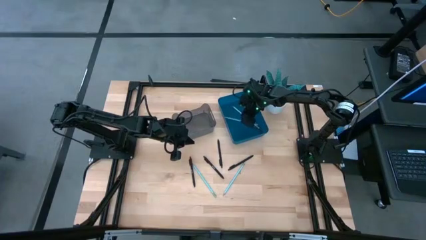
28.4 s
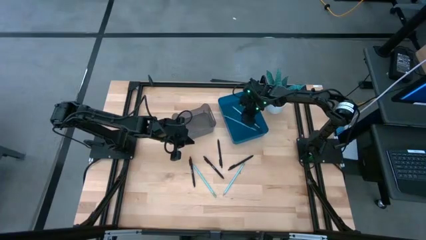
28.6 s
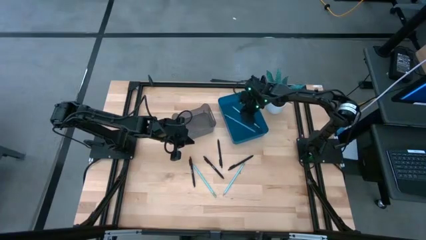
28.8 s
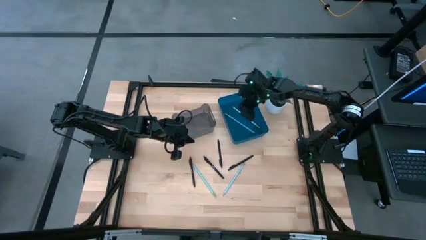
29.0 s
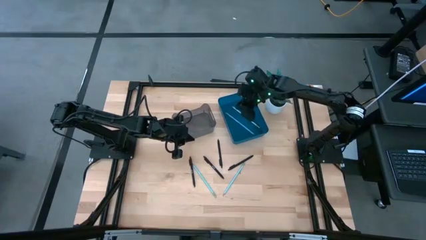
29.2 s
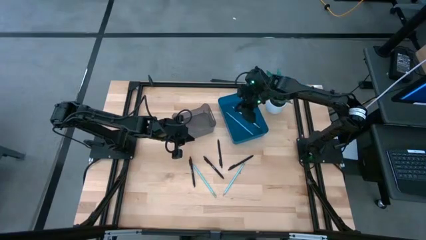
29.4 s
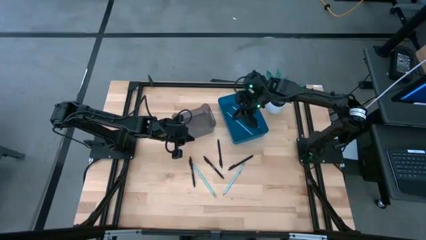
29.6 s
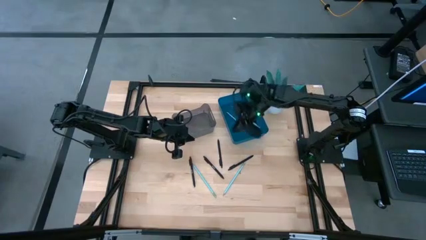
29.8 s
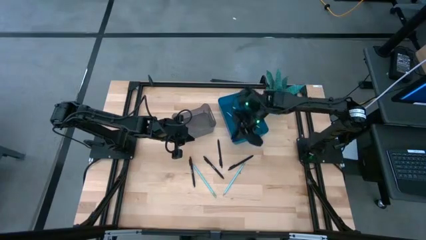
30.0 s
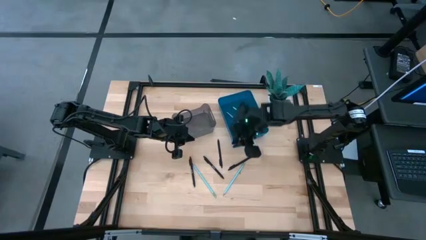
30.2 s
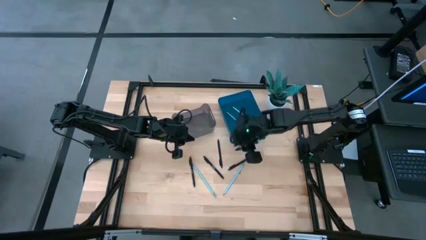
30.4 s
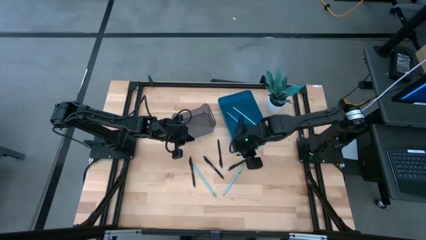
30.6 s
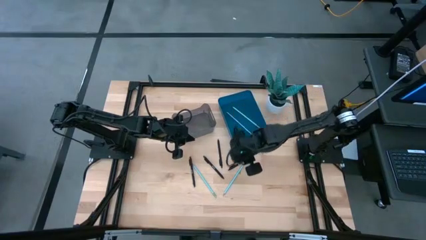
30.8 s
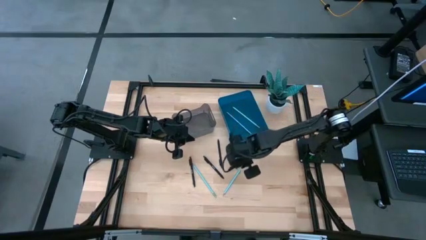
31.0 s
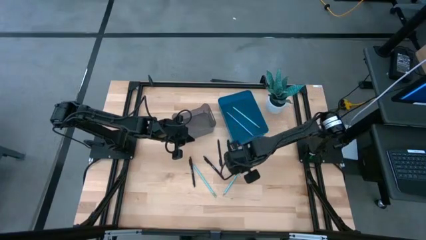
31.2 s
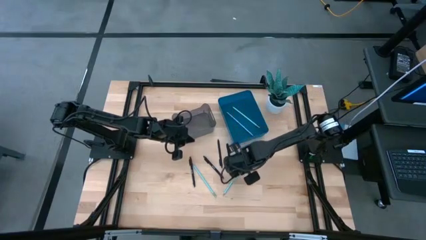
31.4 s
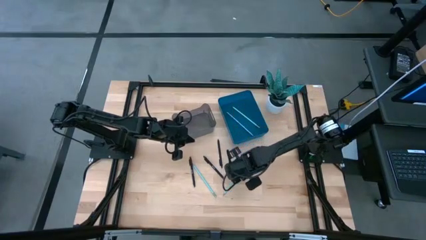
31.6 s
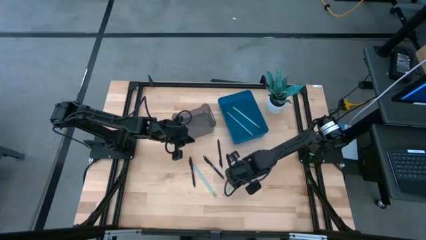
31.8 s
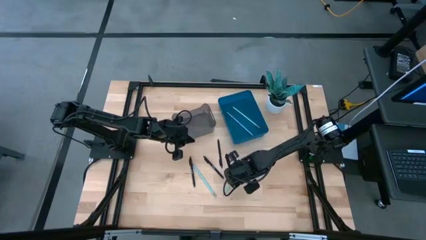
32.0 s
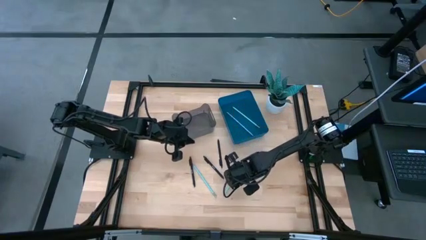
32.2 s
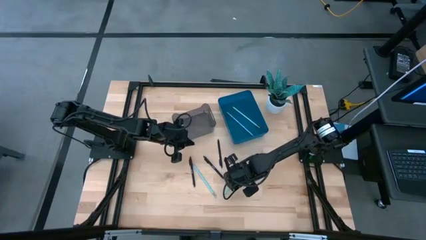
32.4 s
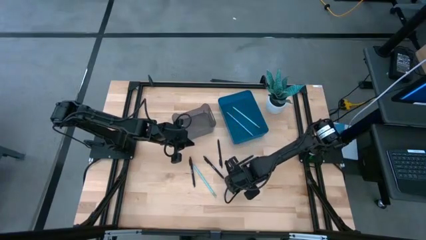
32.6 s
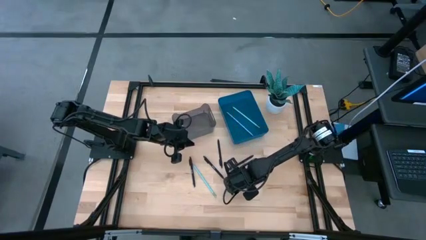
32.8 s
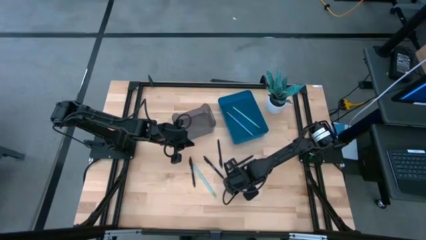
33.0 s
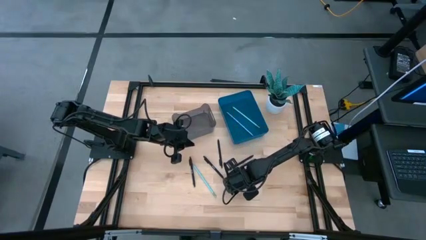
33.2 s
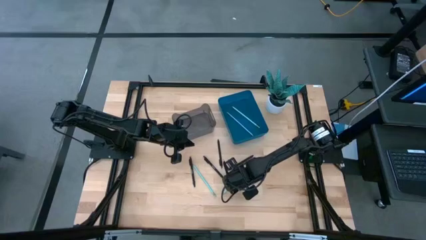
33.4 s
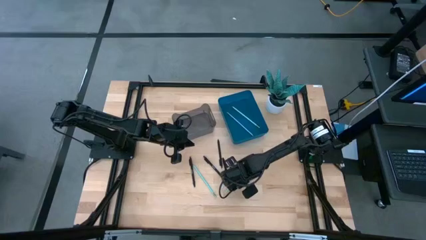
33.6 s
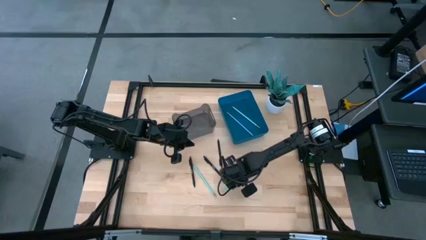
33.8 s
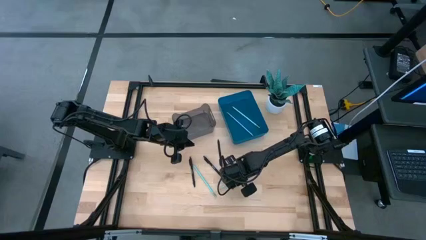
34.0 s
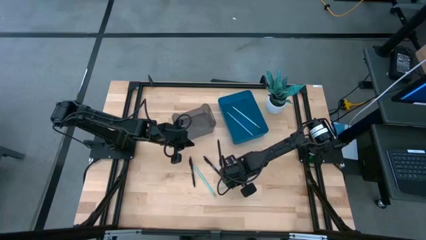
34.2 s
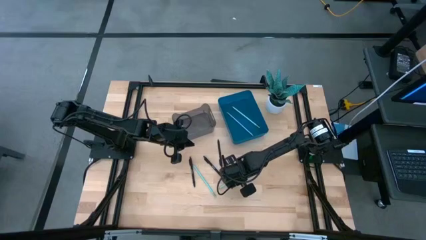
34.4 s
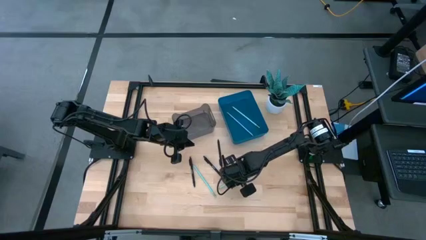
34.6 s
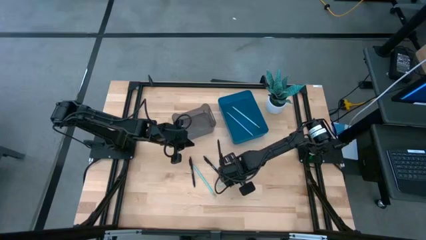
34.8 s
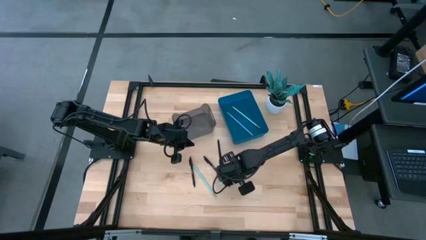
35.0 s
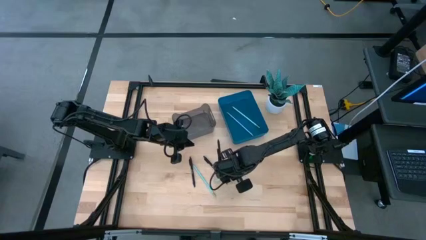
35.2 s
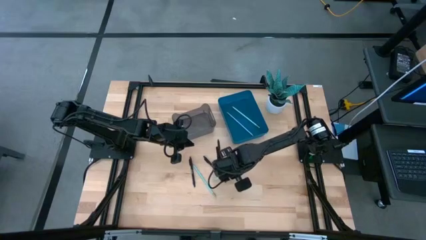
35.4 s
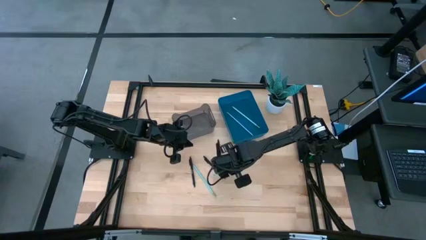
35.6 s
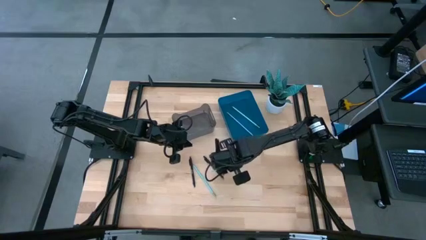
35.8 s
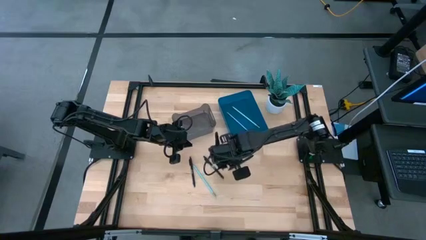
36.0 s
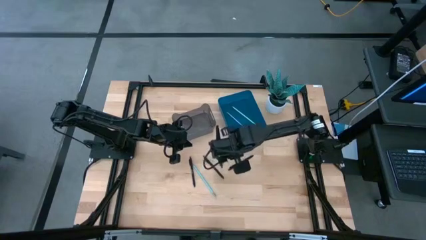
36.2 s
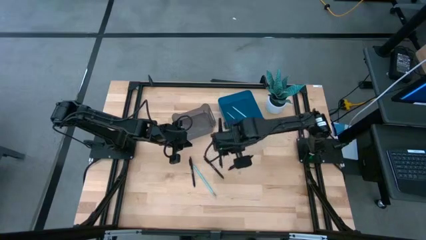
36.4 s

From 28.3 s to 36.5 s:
Task: Sort pens & pencils
Put the light blue pencil into the blue bin

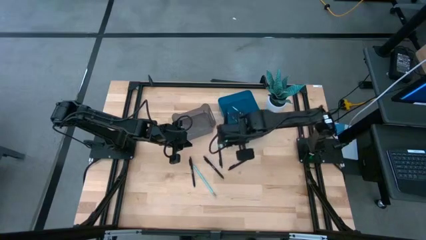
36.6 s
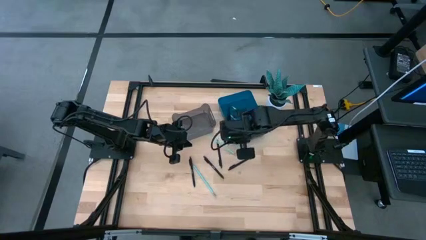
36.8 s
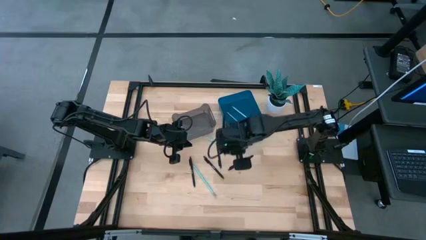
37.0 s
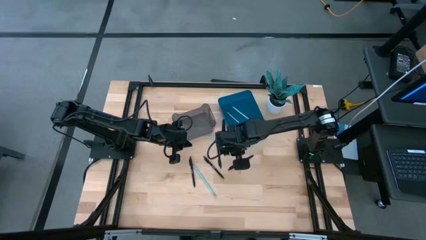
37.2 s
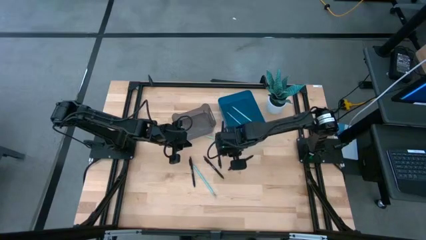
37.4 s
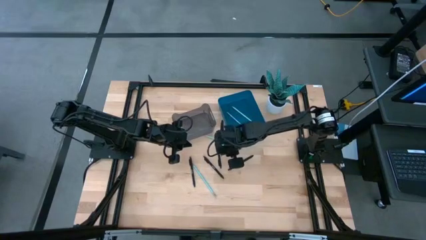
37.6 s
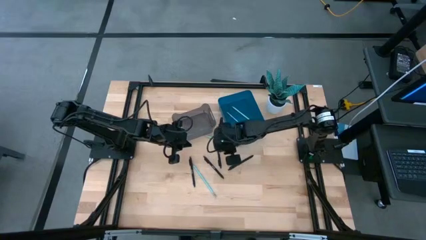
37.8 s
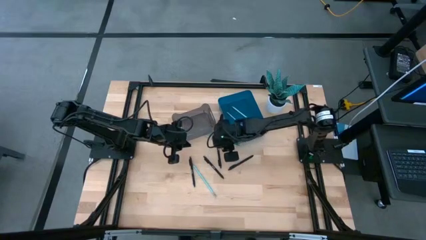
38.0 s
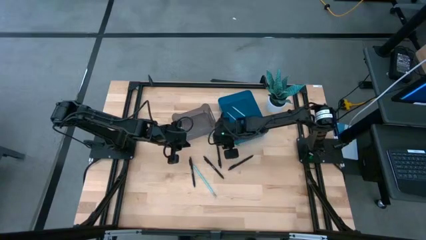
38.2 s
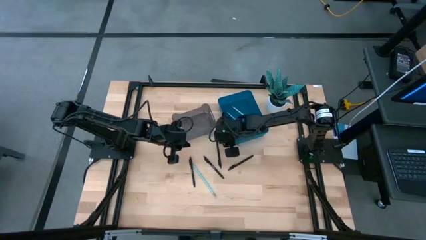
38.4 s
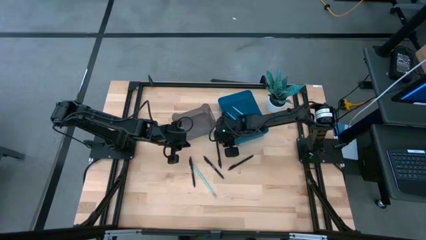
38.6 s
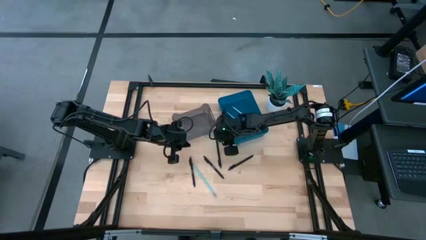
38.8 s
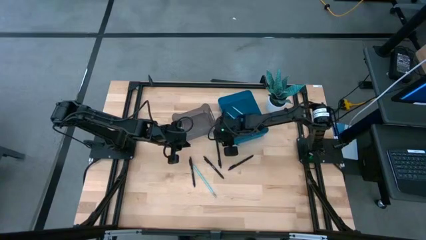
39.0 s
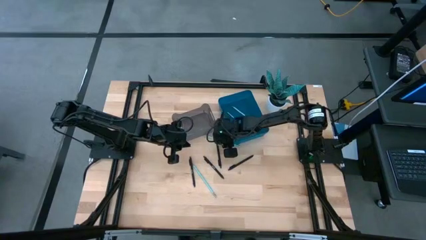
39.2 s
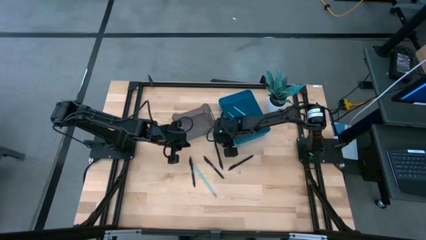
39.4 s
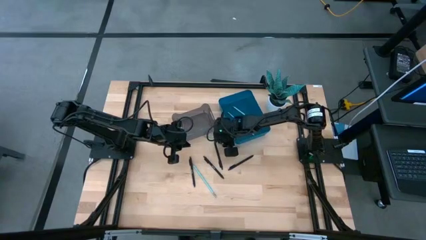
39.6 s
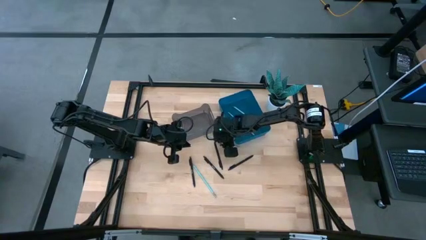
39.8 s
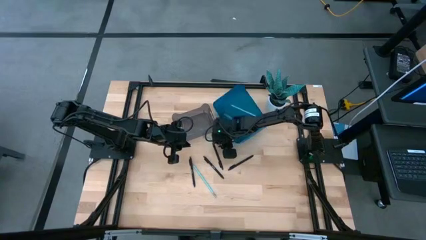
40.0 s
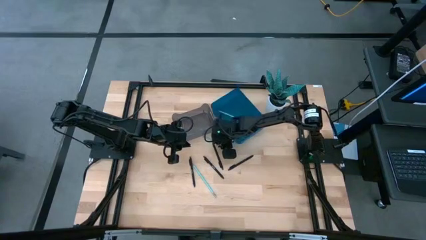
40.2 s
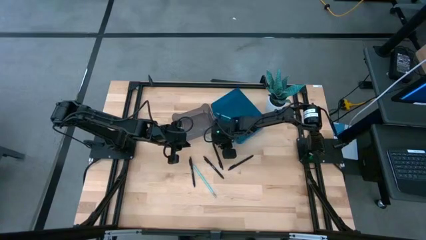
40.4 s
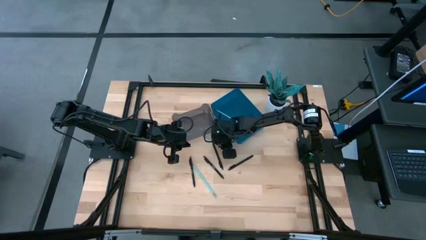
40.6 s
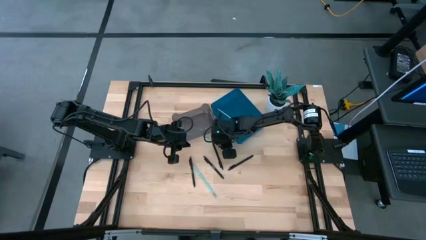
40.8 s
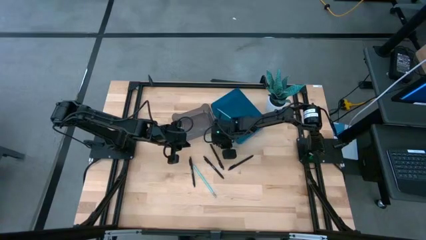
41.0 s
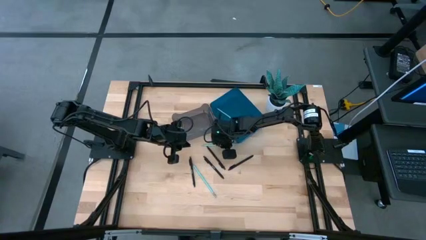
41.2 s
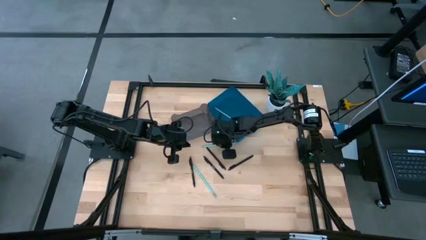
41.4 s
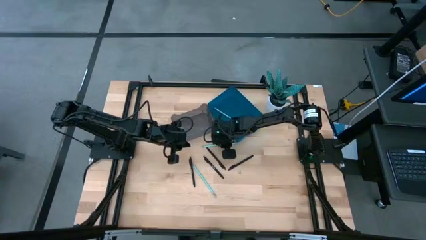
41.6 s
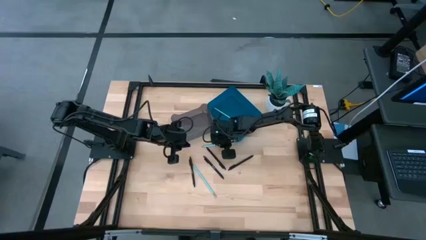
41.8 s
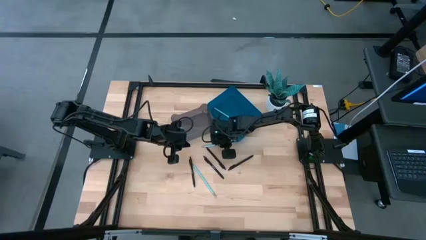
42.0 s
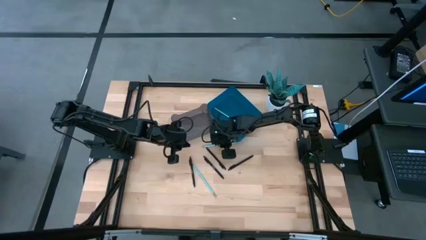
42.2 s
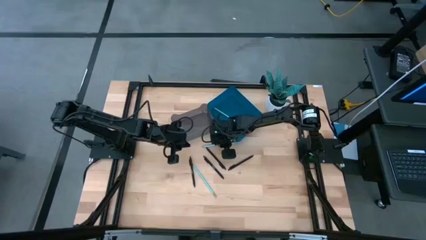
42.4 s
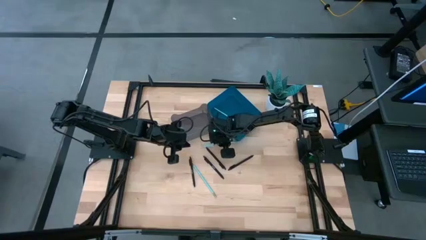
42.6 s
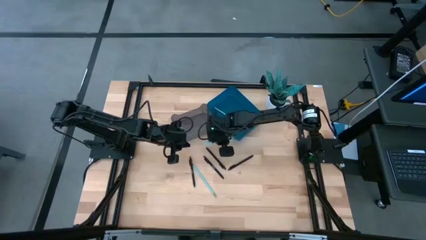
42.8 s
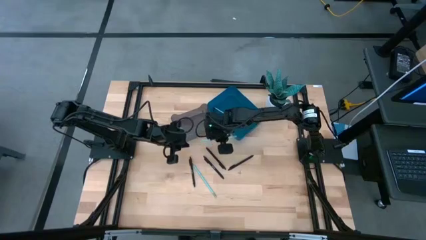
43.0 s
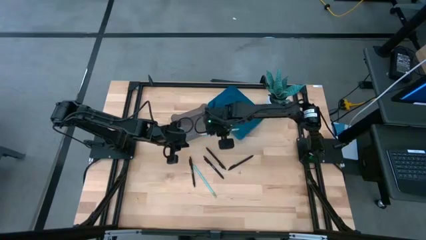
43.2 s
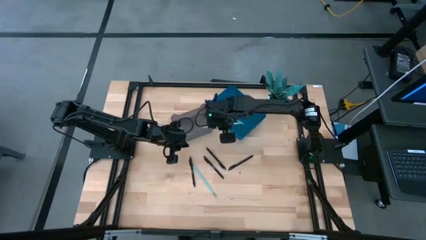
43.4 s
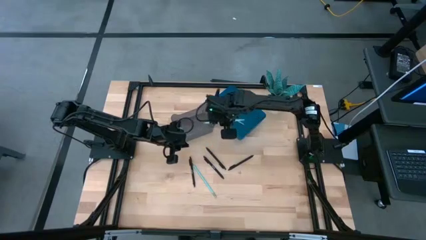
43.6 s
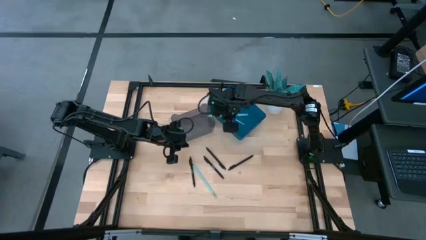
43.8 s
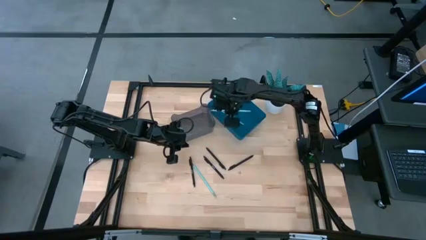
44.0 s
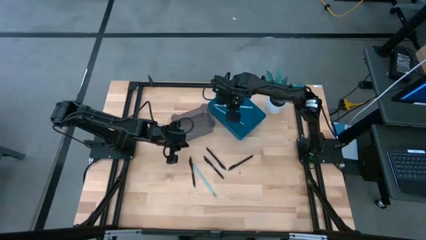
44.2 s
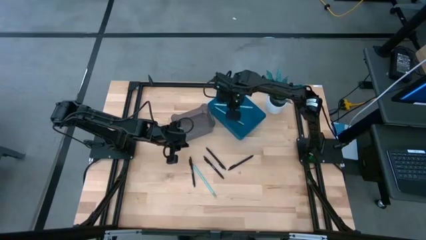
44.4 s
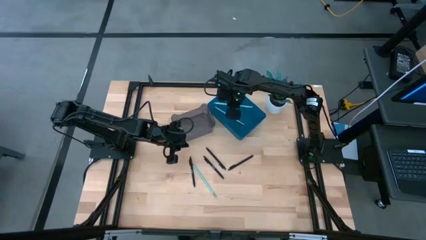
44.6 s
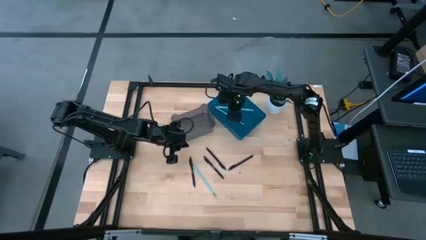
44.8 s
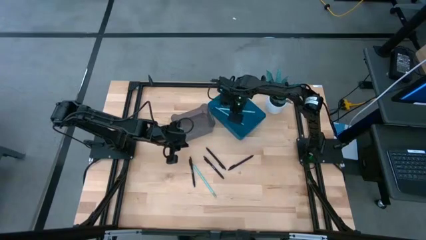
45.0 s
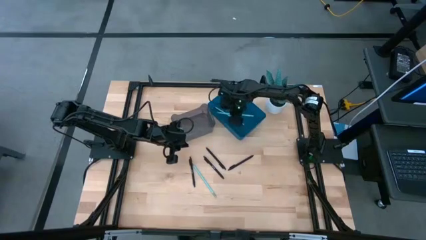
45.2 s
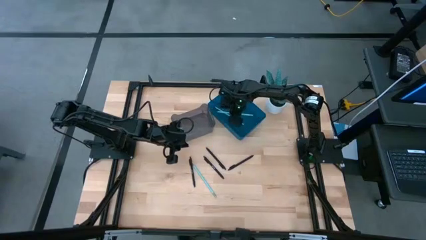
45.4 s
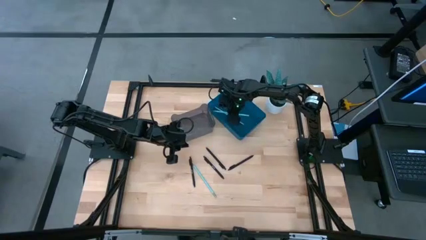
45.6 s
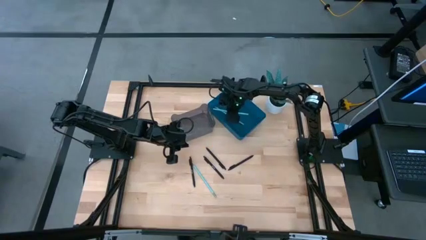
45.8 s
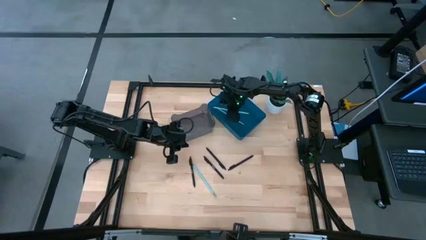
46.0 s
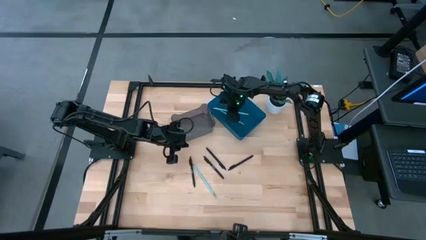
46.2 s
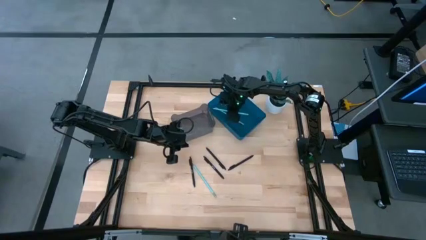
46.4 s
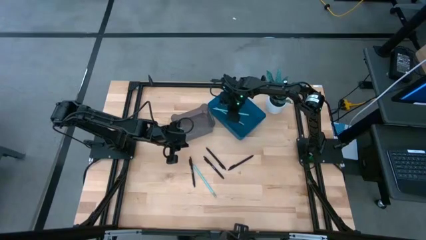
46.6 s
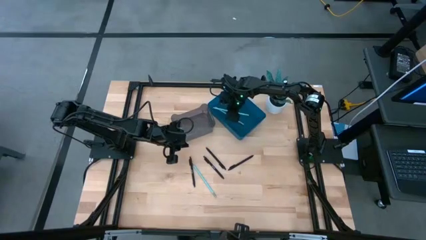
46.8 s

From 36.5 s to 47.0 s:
Put the light blue pencil into the blue bin
